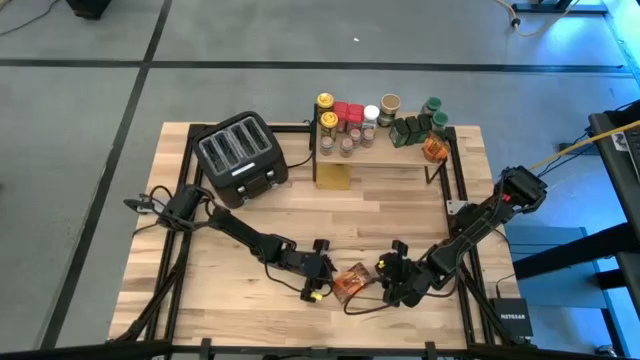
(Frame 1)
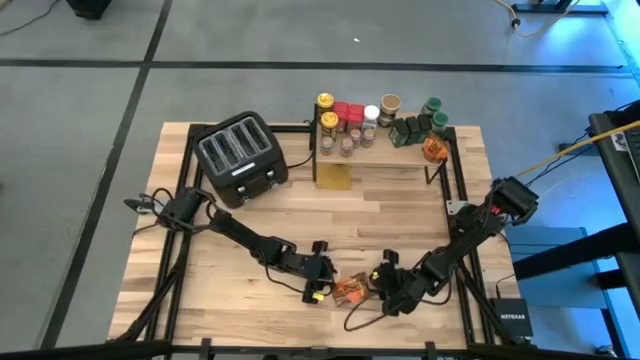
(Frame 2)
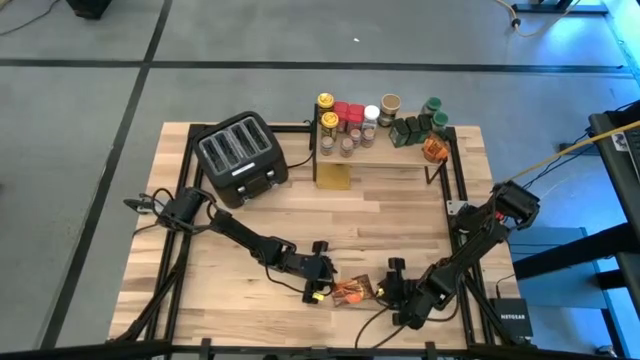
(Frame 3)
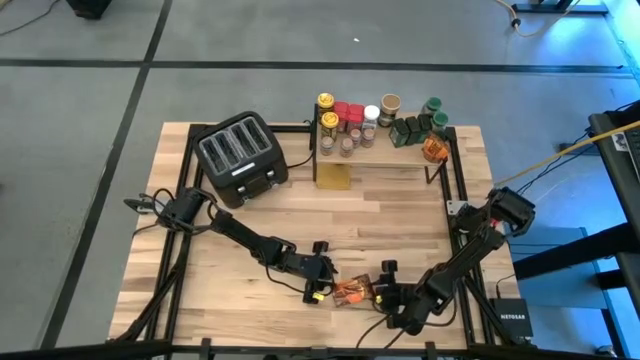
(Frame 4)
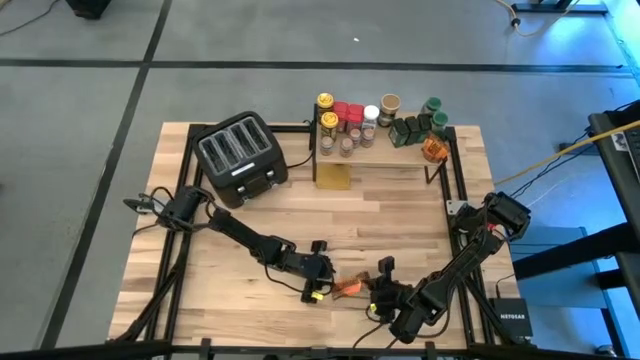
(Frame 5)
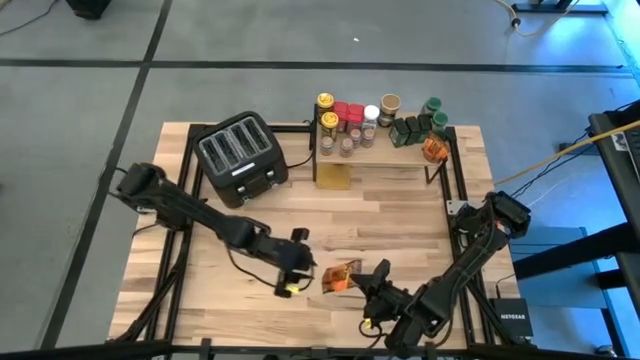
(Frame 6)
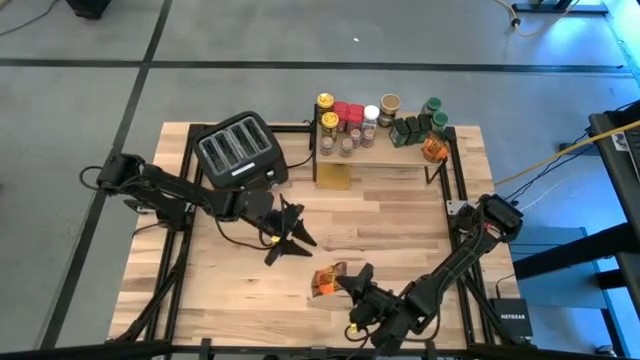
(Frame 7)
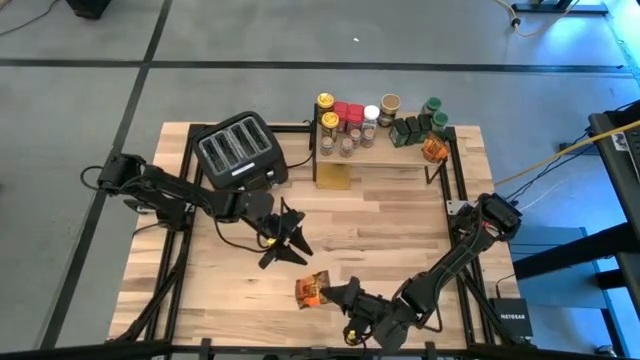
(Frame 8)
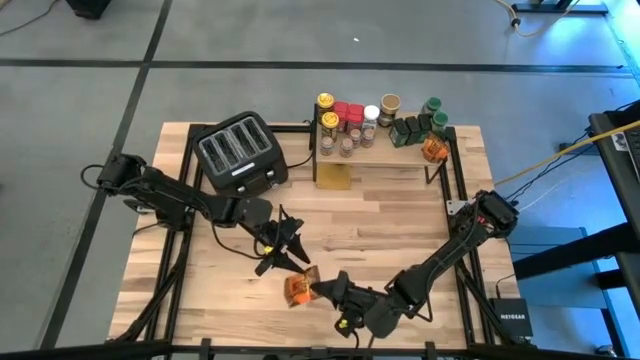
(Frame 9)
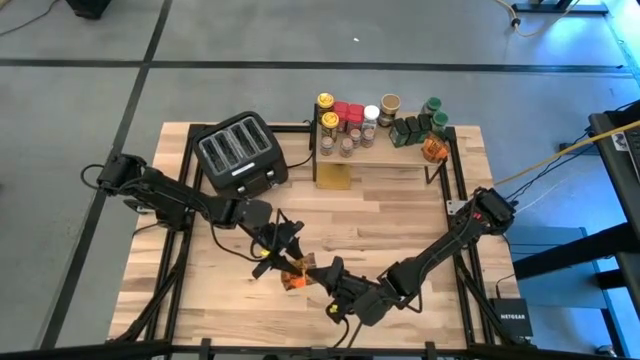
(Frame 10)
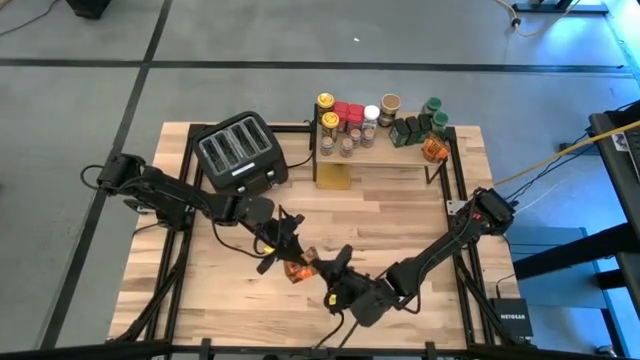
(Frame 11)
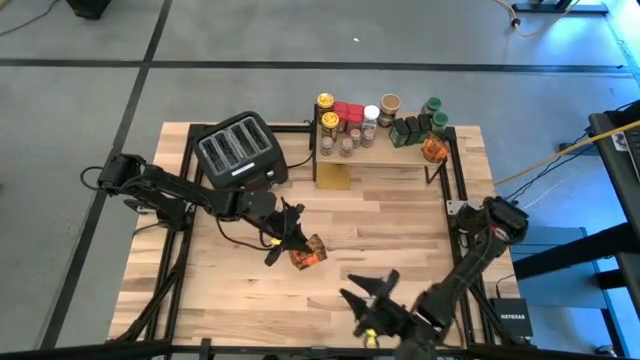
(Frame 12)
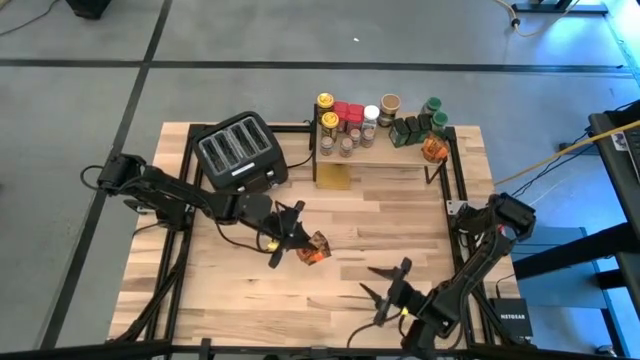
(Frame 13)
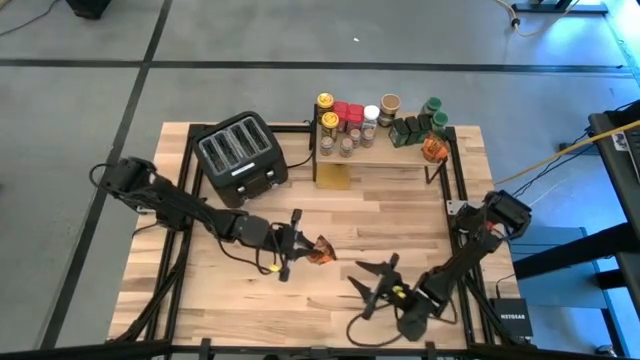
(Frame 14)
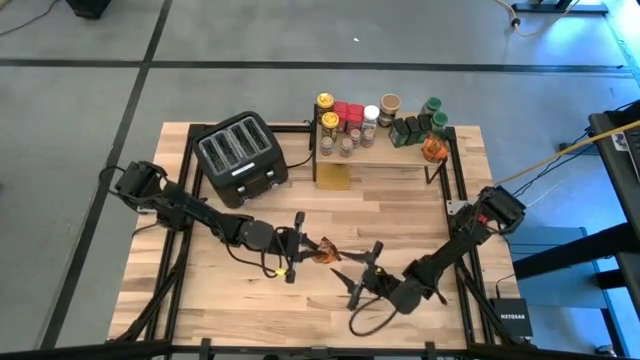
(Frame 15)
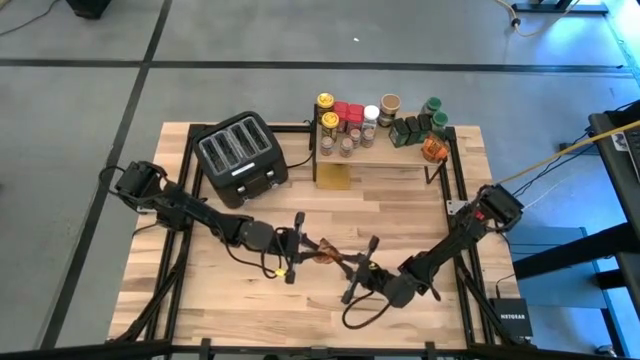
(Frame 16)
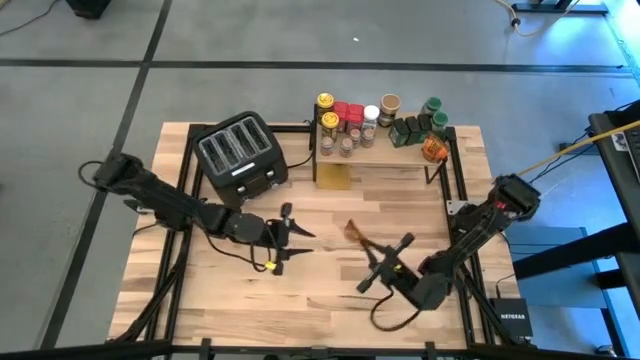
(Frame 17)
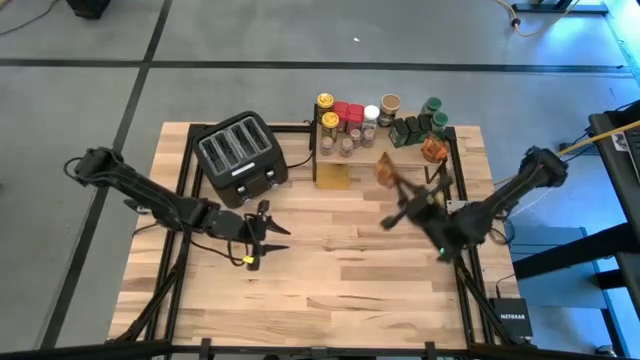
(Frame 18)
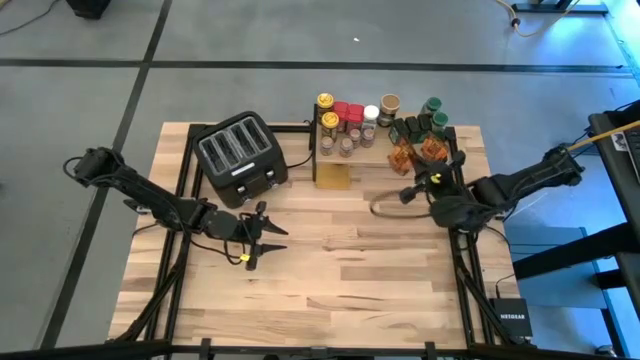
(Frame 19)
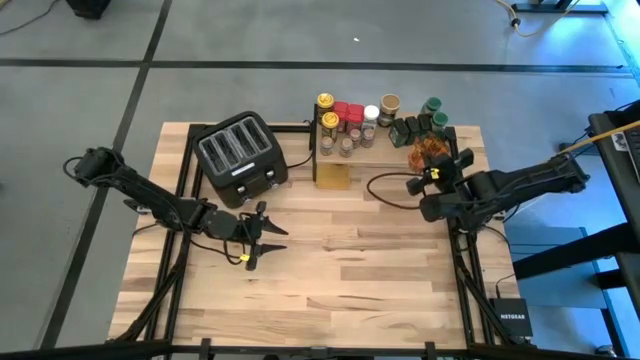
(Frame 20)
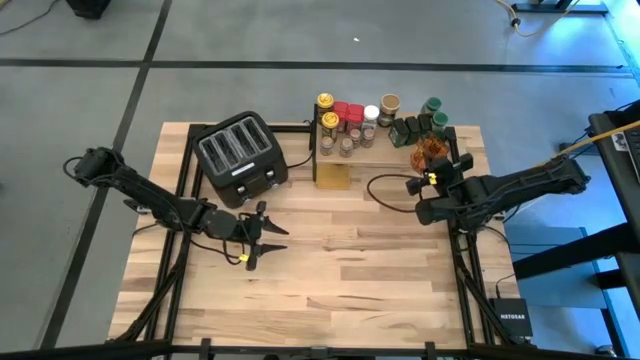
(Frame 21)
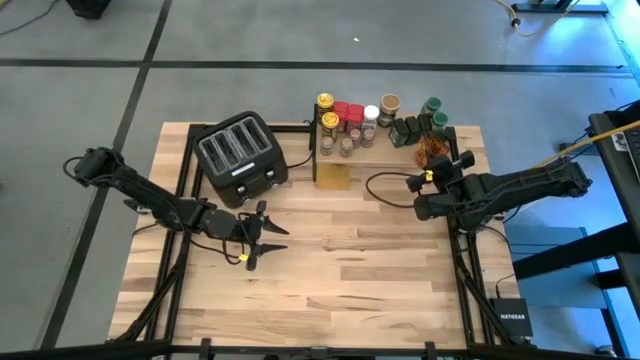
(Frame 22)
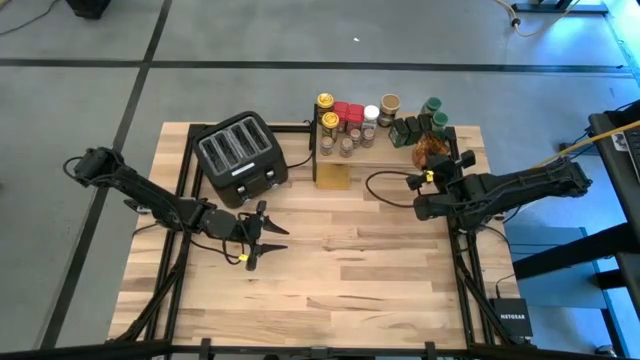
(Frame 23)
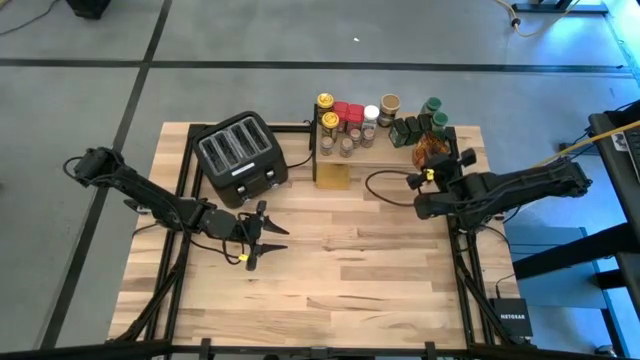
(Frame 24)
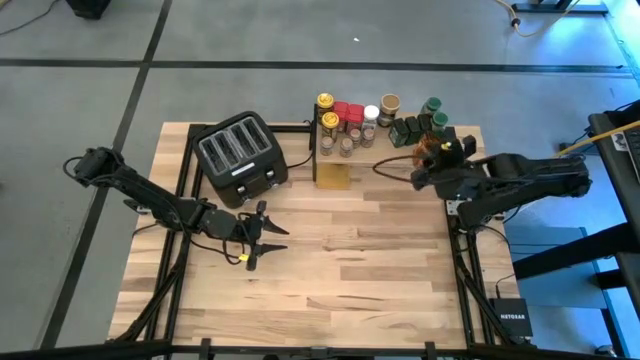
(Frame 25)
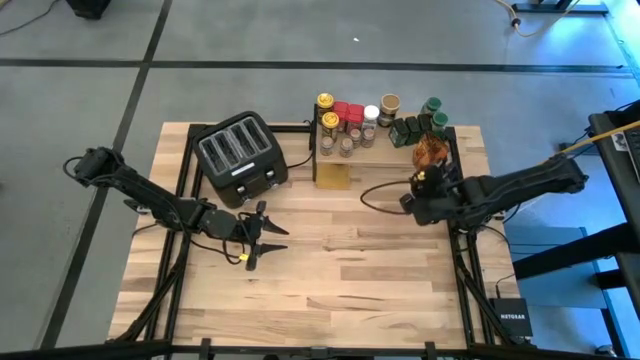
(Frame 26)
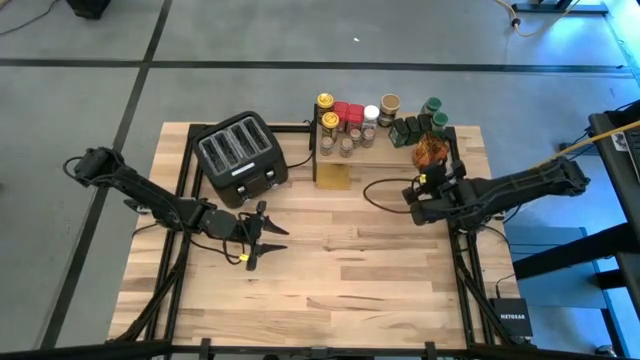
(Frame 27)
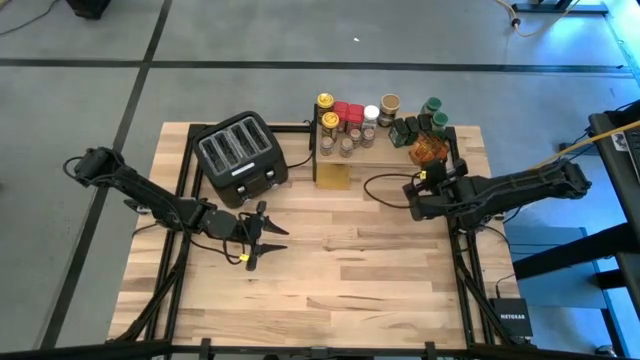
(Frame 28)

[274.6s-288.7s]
Task: Shelf spices
Put the orange seasoning pack on the shelf

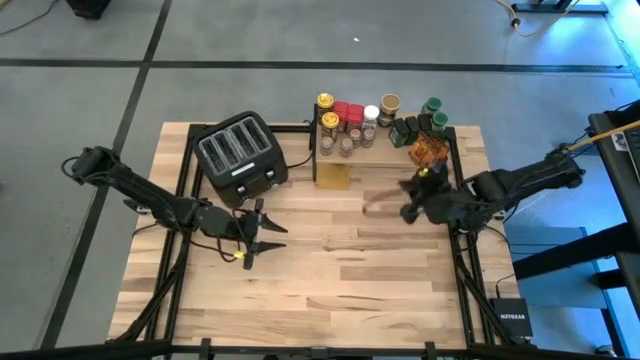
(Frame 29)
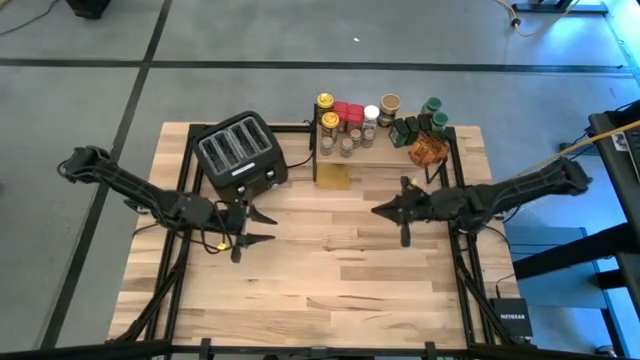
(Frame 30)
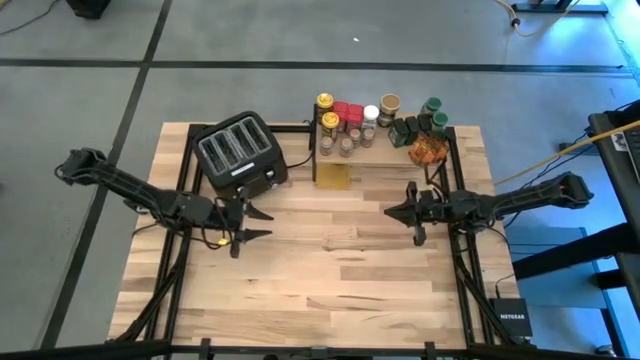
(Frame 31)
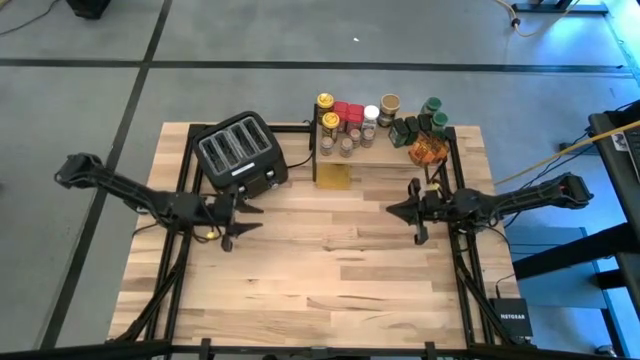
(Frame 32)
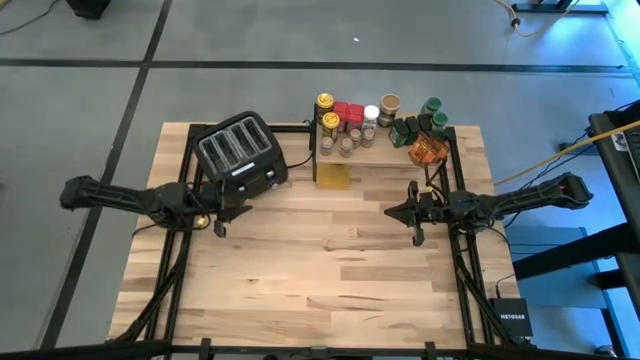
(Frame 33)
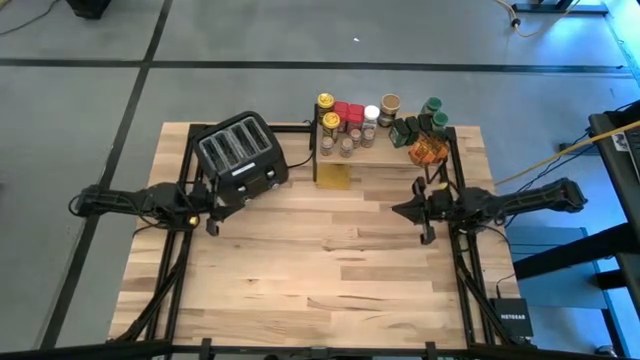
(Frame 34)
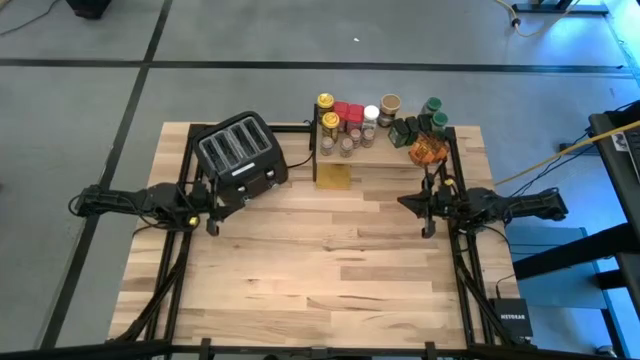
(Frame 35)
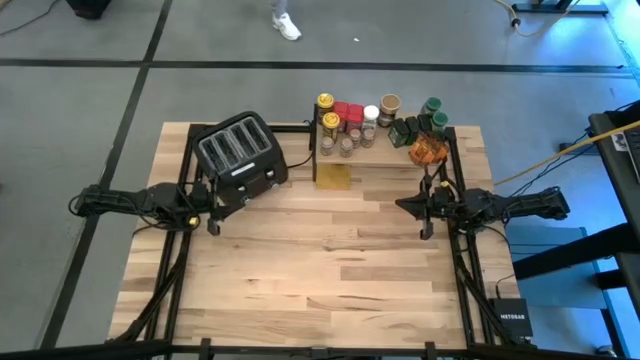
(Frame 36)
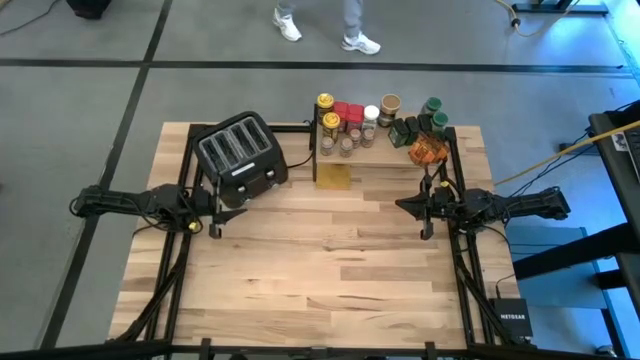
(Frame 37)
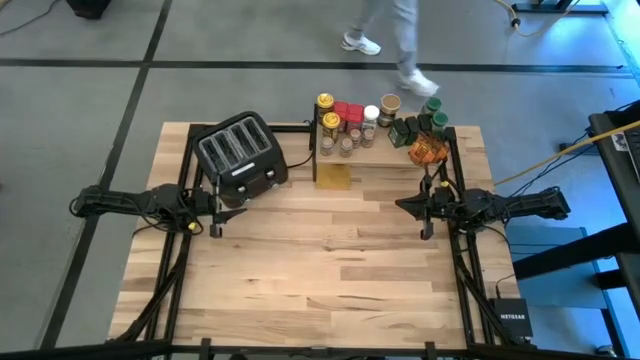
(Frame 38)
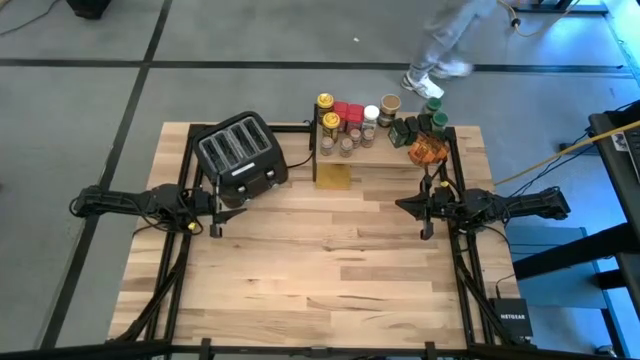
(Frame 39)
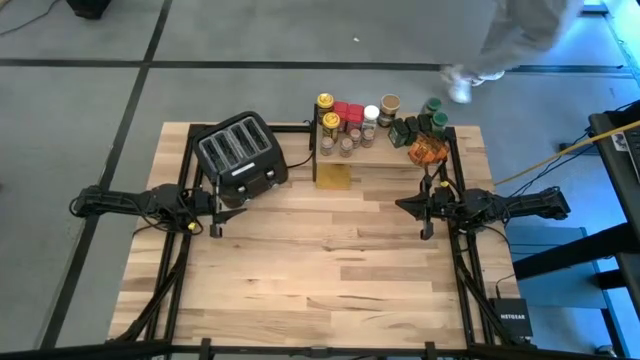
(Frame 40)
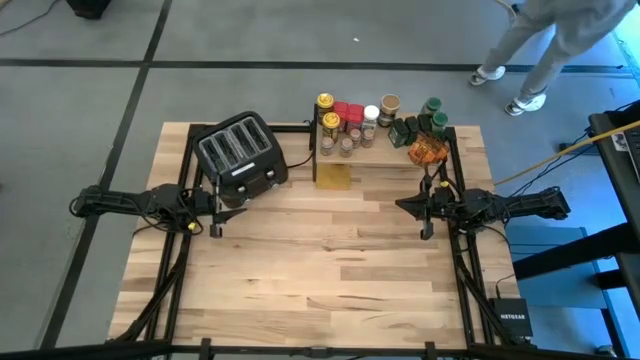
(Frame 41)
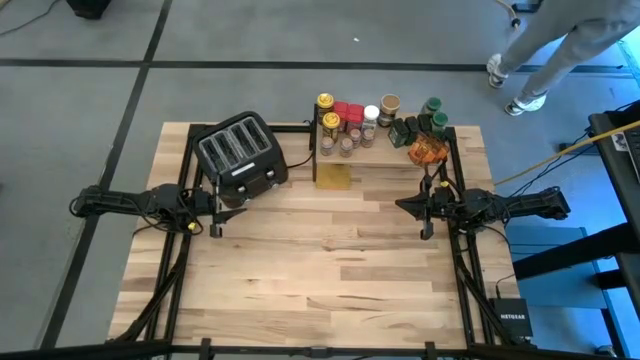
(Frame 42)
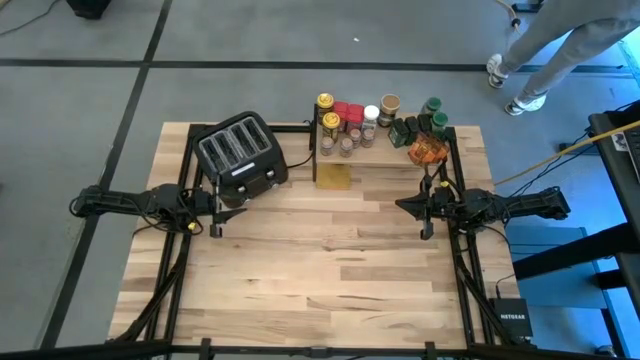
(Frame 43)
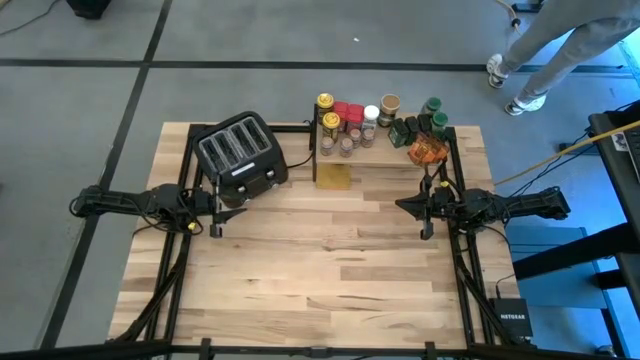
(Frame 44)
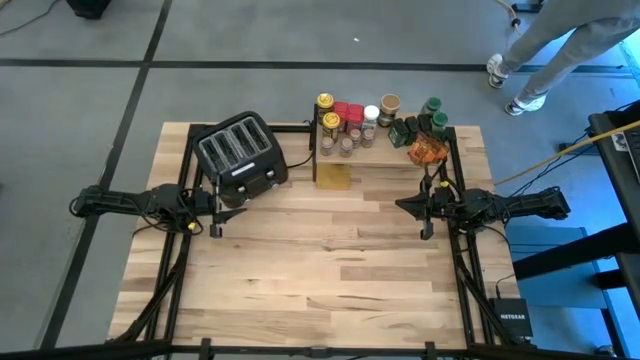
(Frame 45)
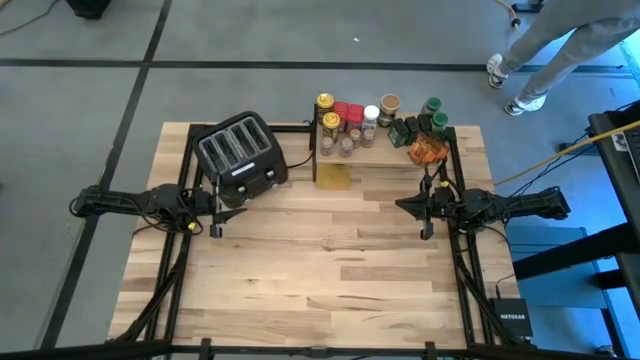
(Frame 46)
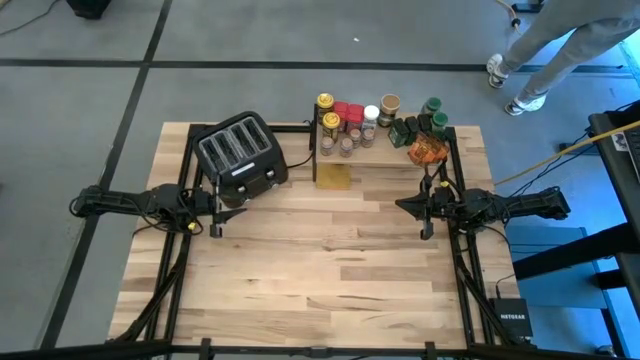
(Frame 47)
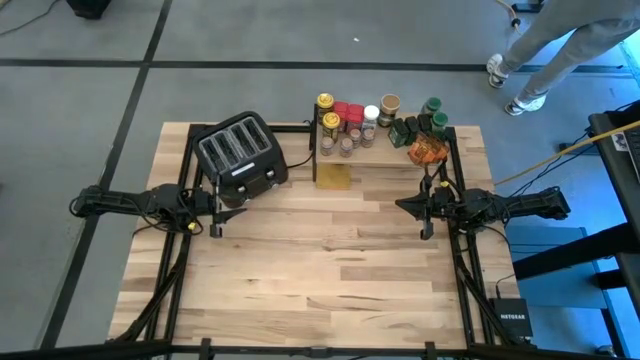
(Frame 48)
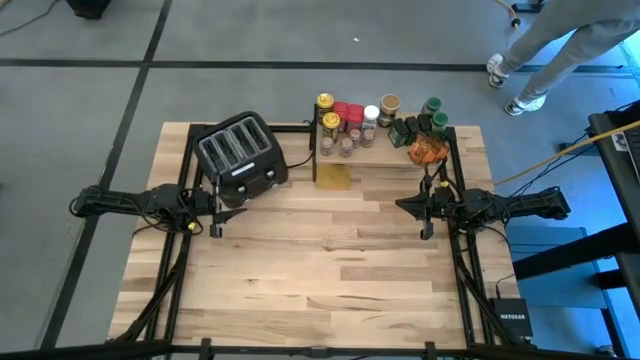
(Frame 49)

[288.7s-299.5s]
Return to Home Position
